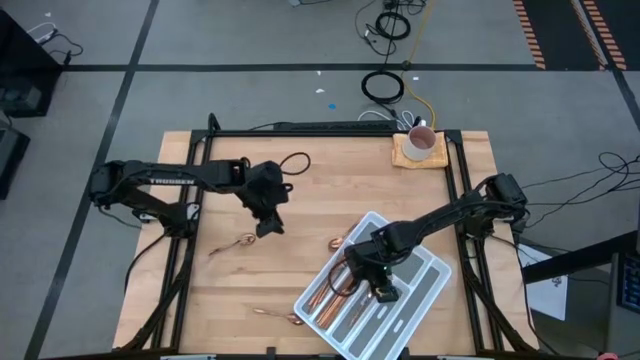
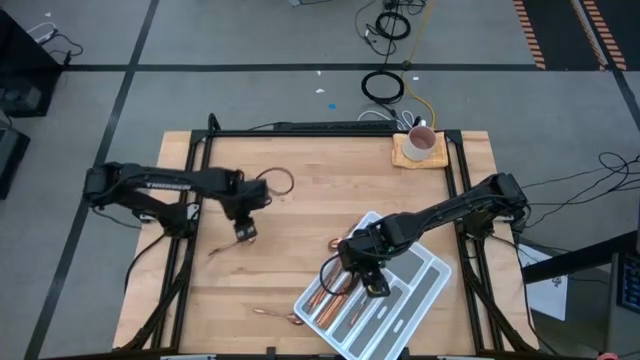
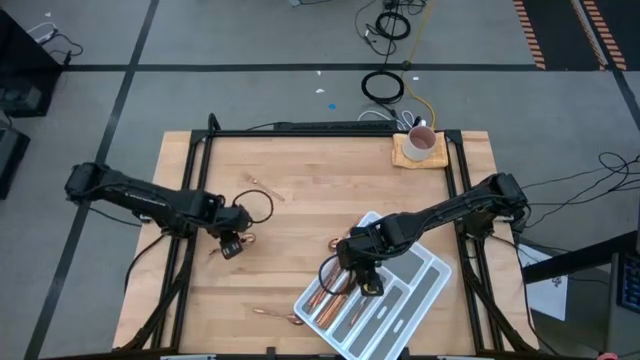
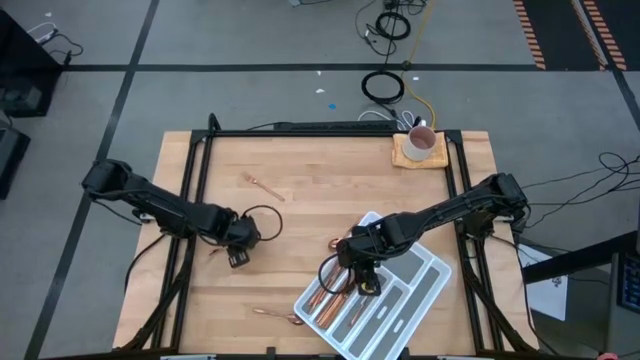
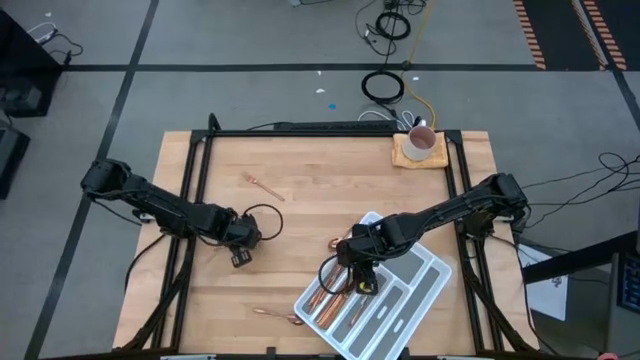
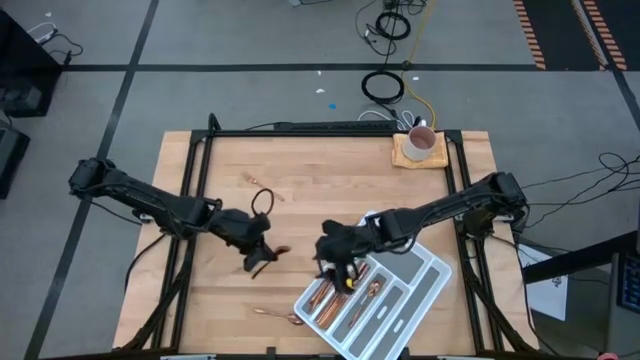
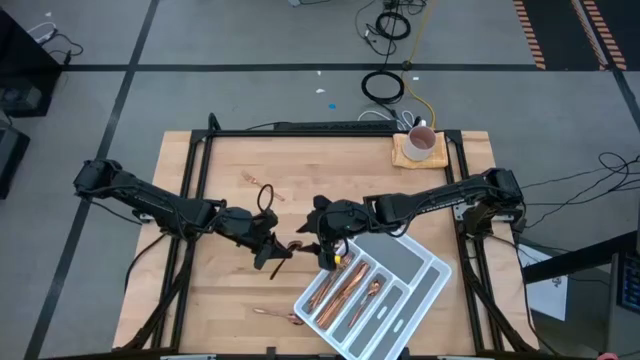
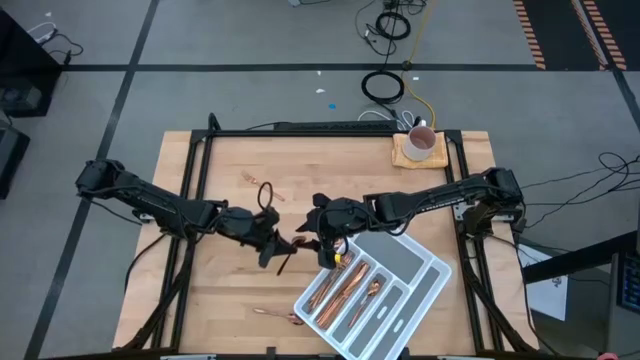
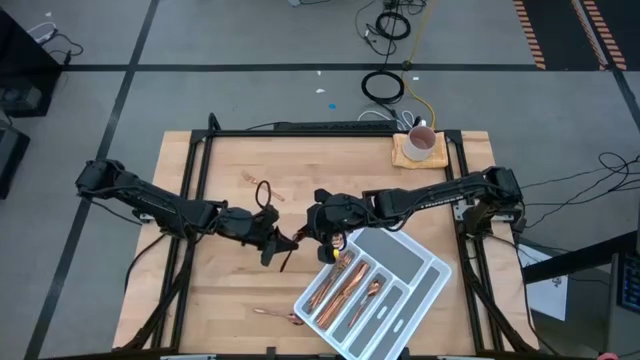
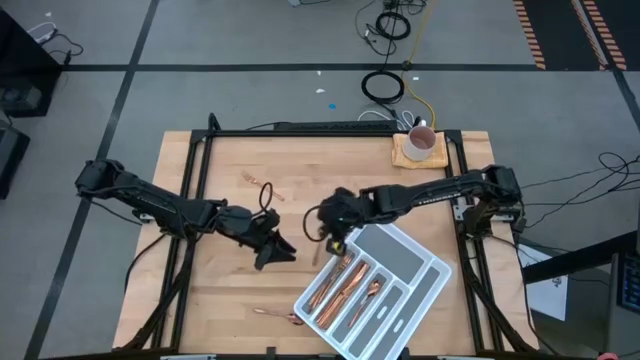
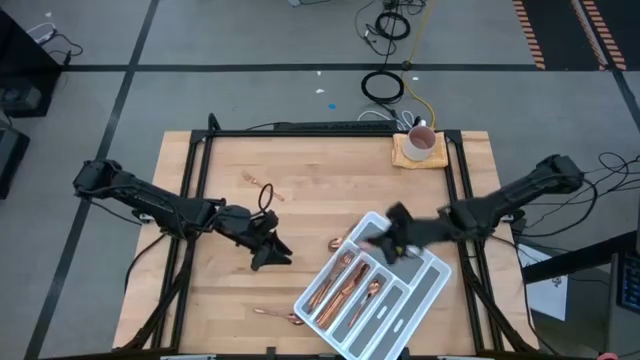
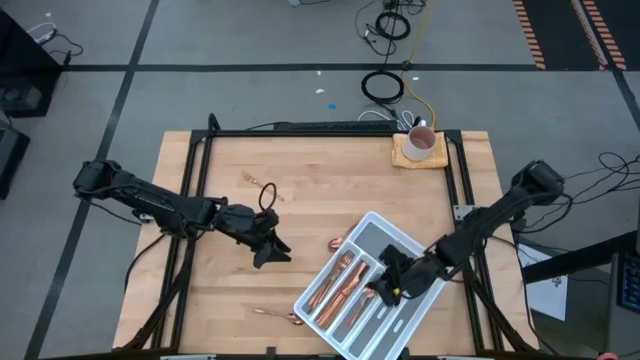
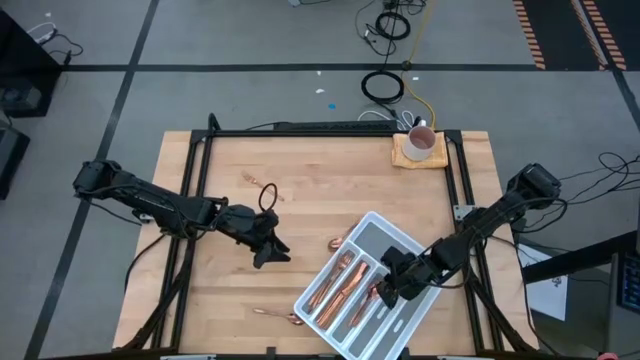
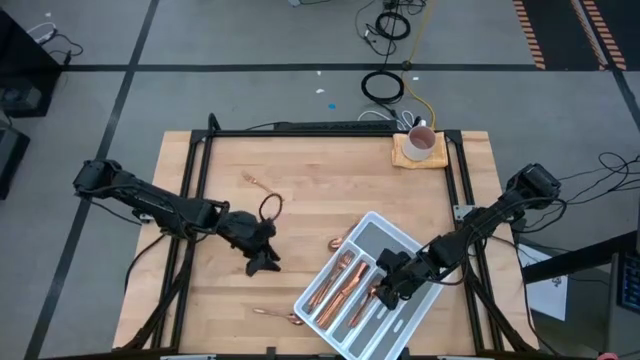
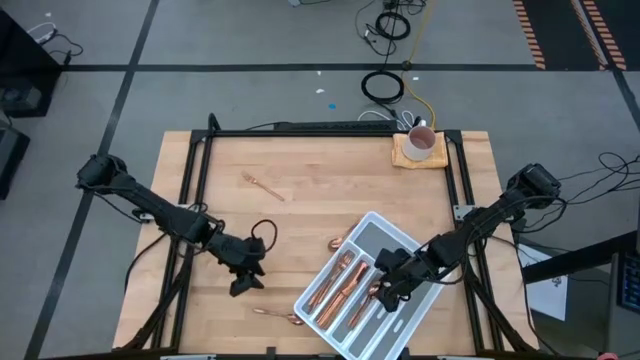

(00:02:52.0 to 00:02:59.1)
Task: Sort silverware
Put the gold spoon into the silverware tray

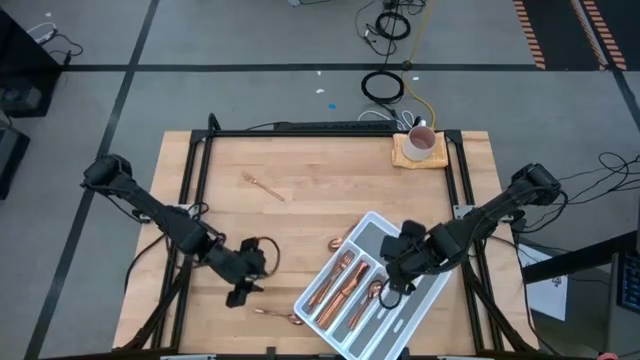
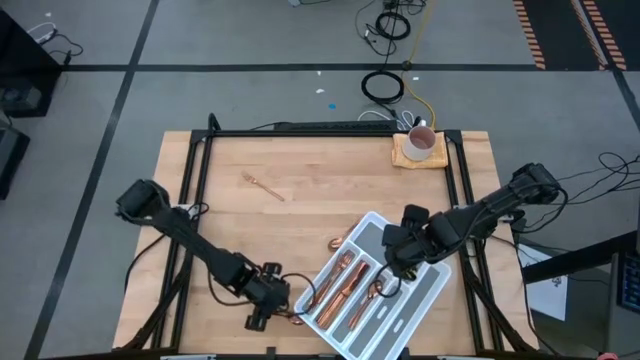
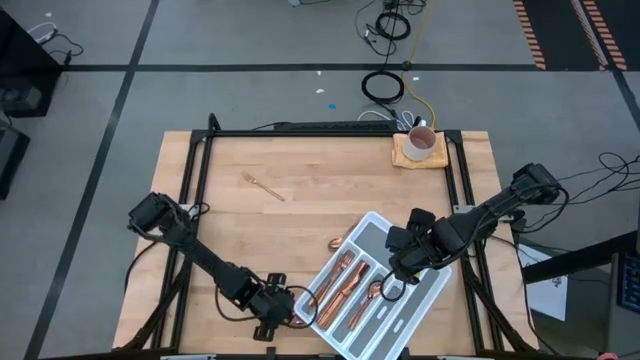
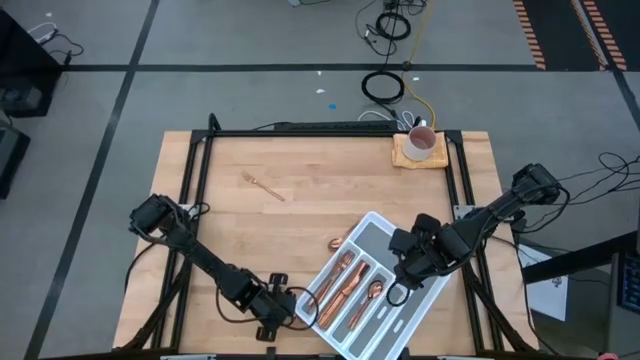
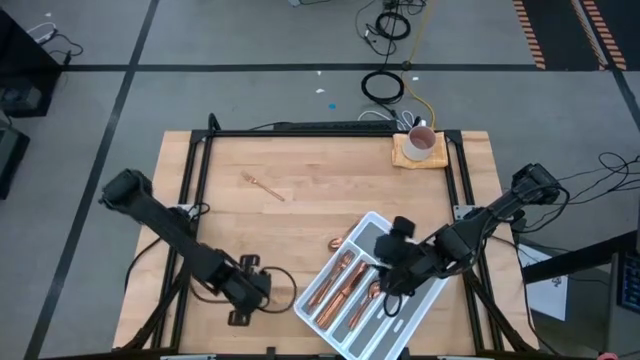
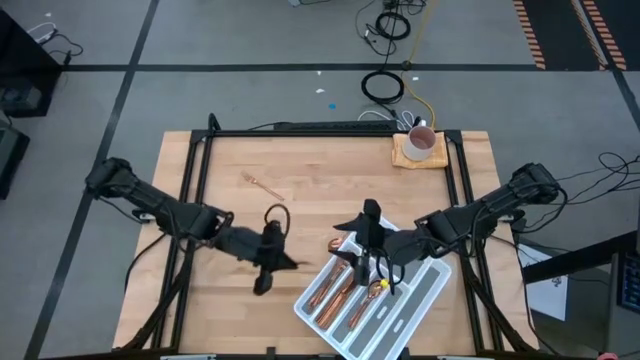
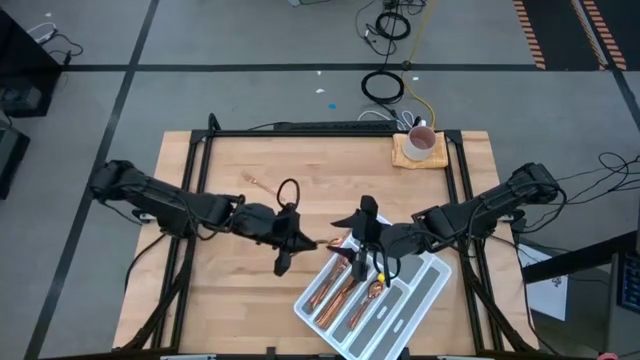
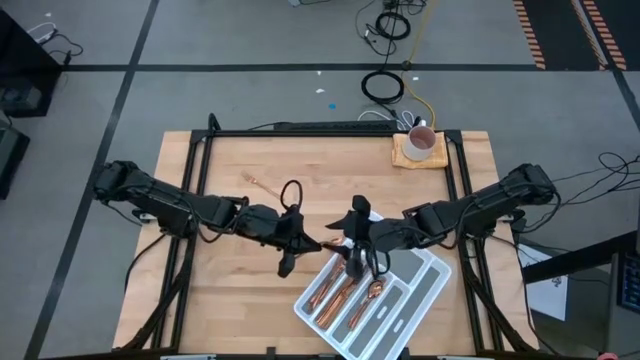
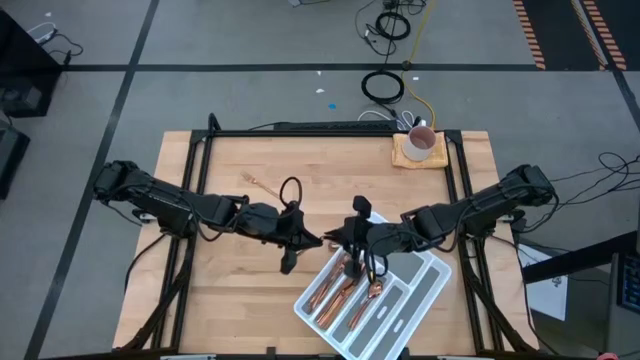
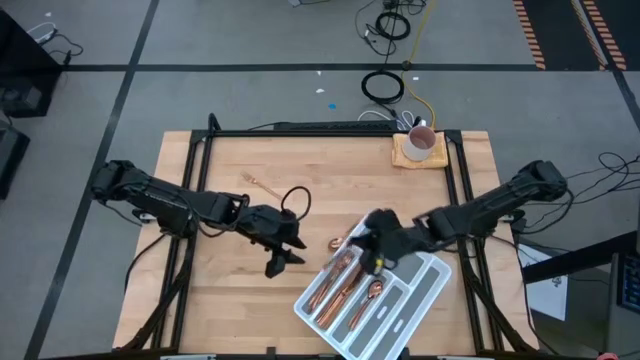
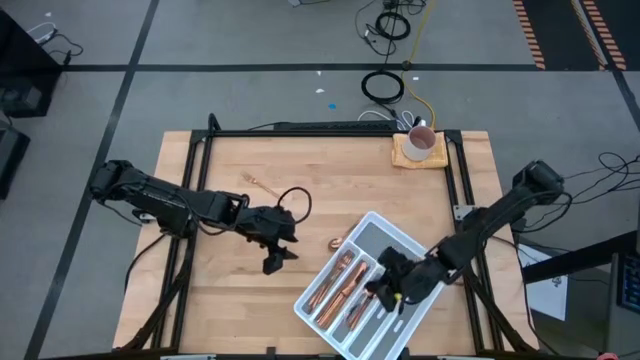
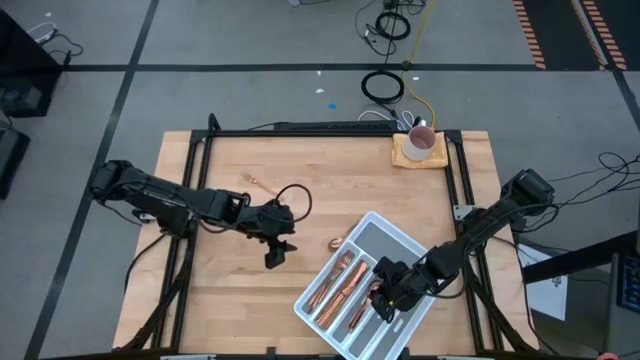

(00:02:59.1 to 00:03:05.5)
Put the gold spoon into the silverware tray
